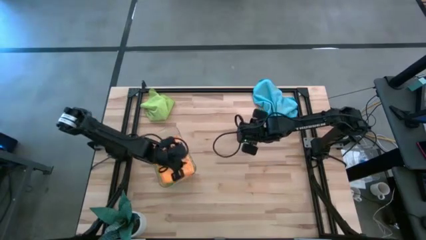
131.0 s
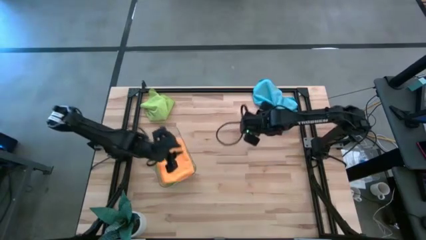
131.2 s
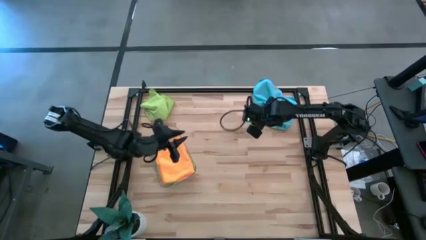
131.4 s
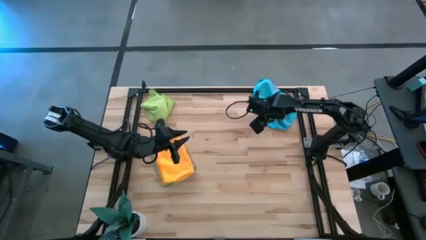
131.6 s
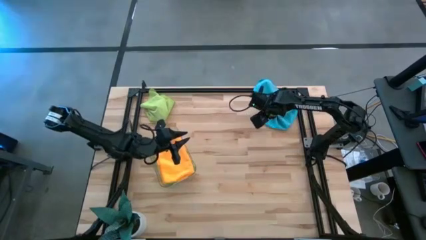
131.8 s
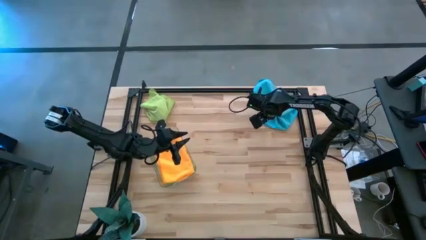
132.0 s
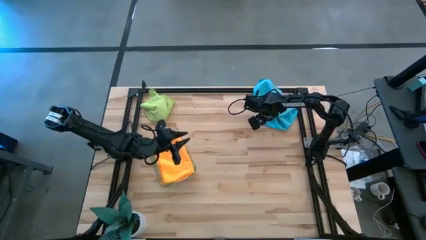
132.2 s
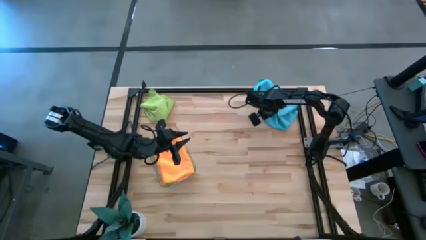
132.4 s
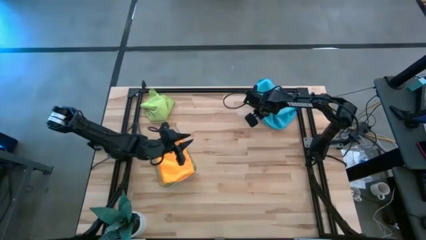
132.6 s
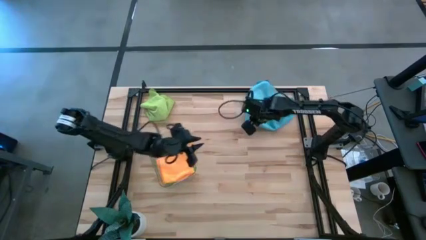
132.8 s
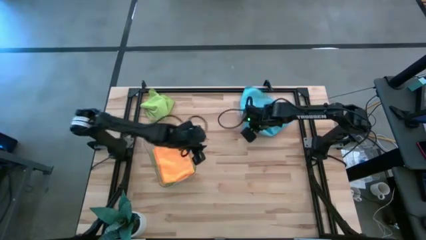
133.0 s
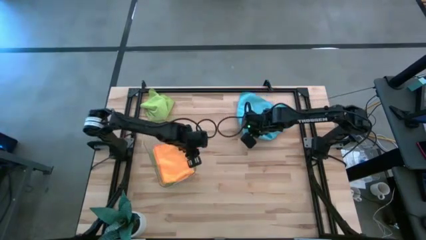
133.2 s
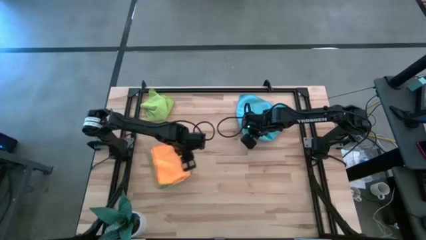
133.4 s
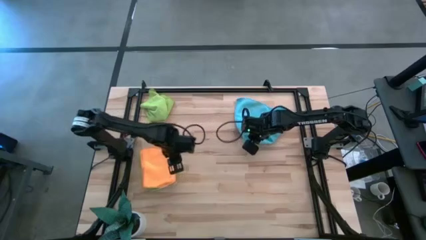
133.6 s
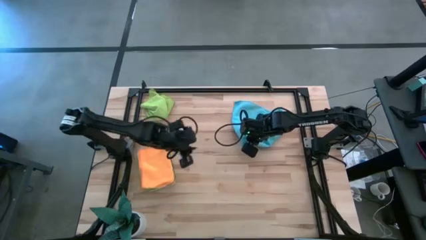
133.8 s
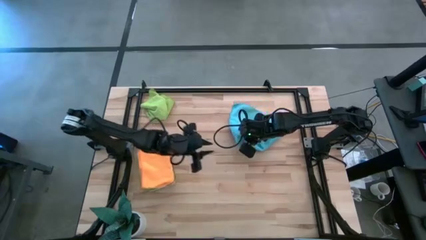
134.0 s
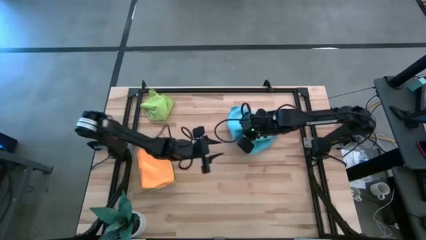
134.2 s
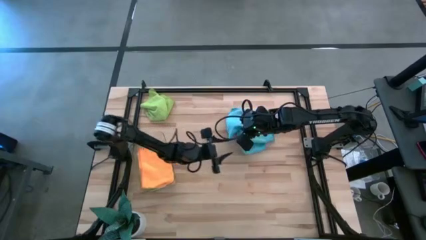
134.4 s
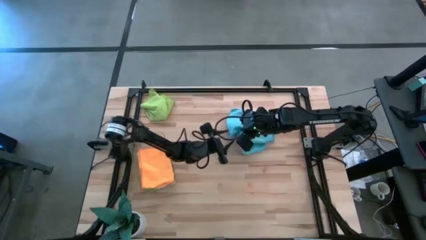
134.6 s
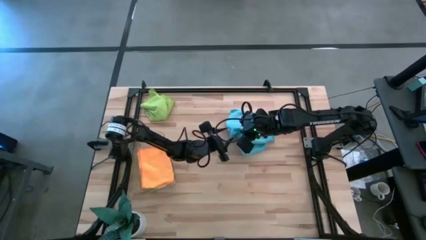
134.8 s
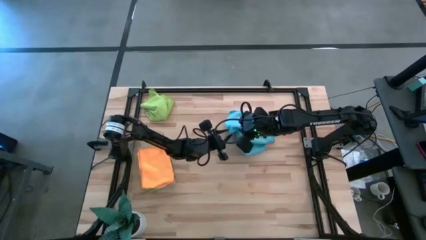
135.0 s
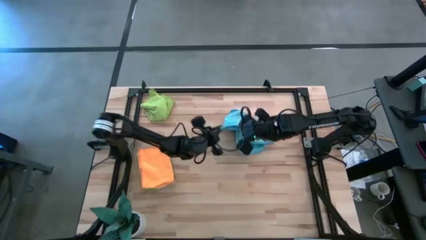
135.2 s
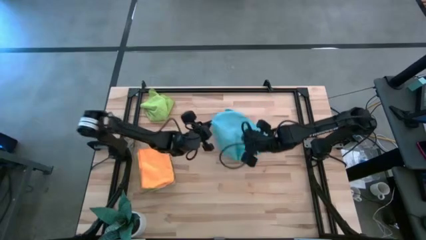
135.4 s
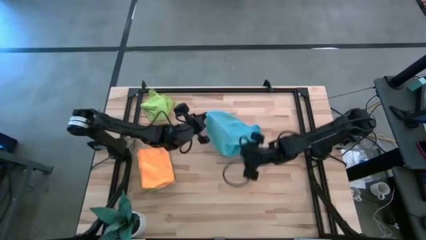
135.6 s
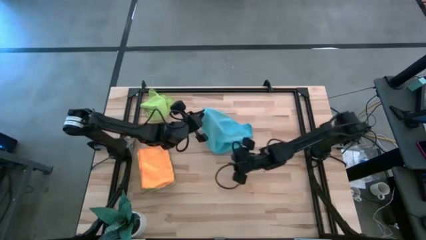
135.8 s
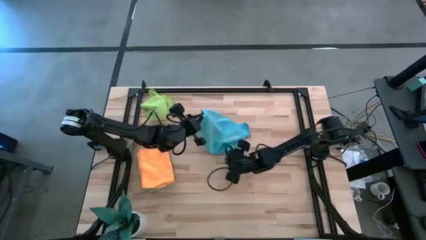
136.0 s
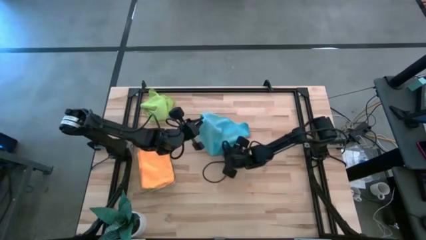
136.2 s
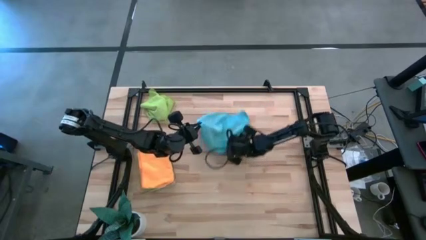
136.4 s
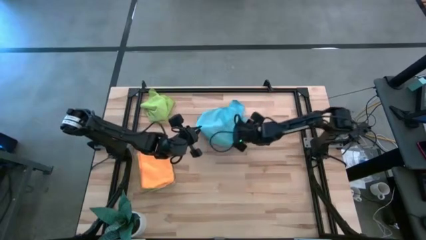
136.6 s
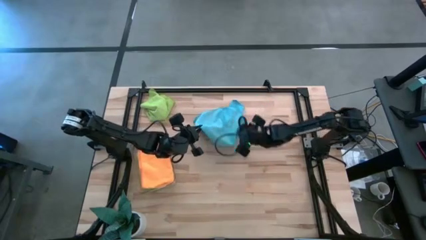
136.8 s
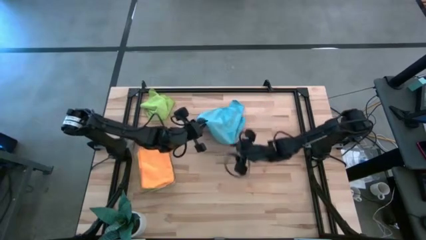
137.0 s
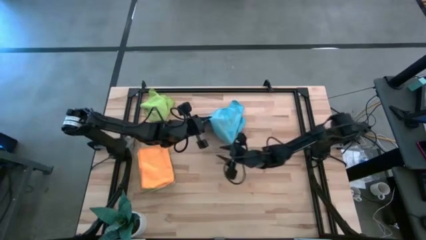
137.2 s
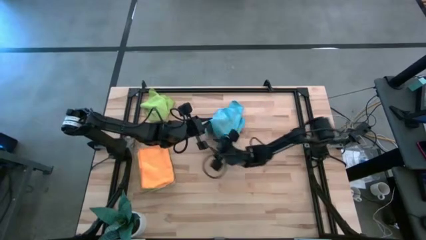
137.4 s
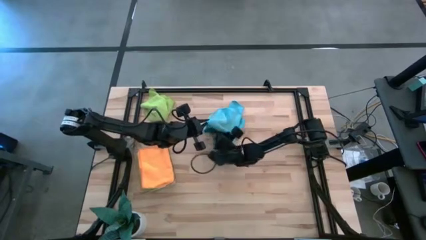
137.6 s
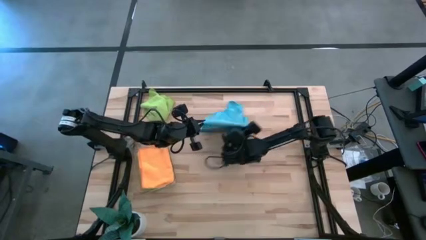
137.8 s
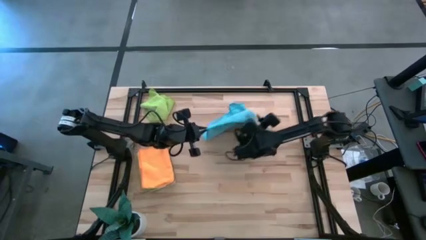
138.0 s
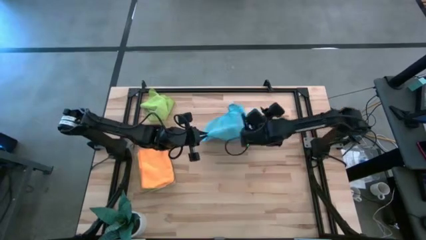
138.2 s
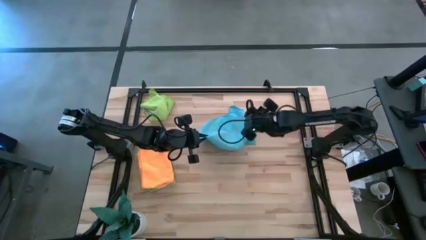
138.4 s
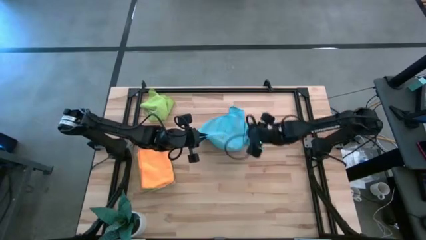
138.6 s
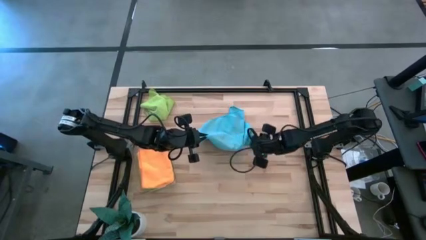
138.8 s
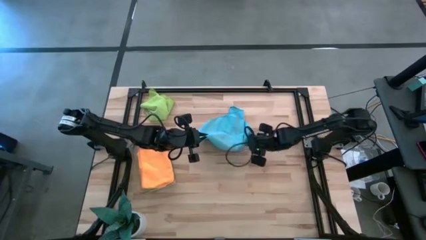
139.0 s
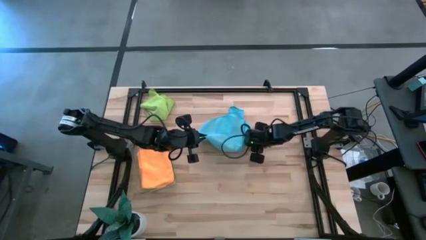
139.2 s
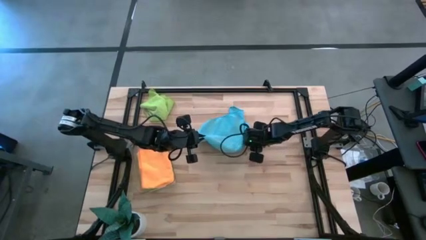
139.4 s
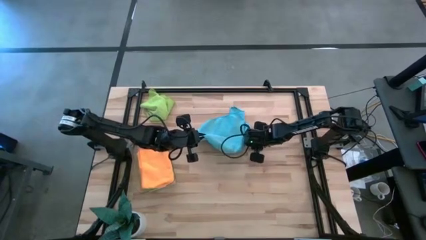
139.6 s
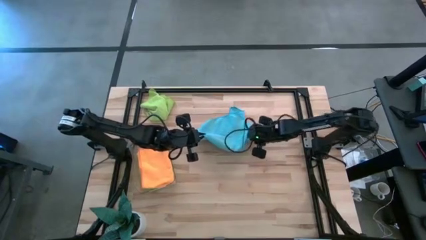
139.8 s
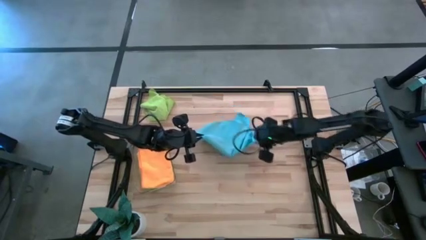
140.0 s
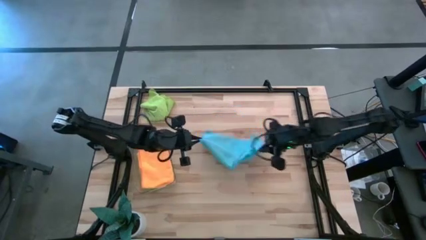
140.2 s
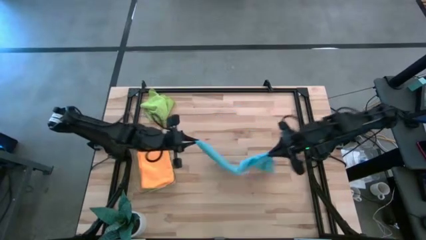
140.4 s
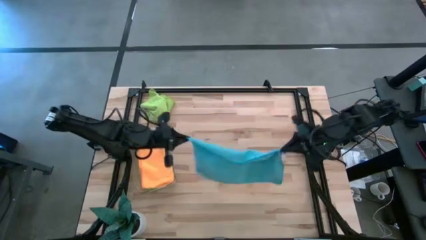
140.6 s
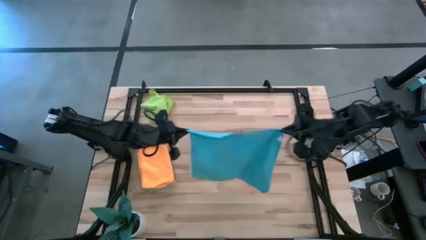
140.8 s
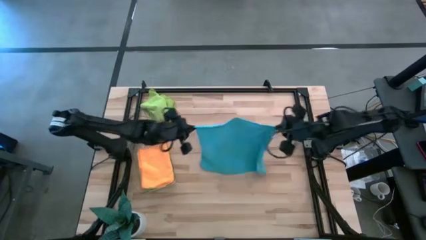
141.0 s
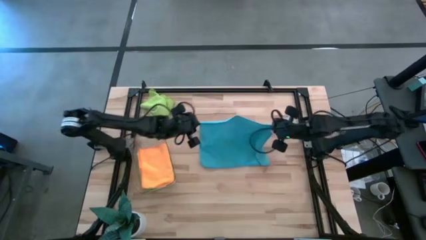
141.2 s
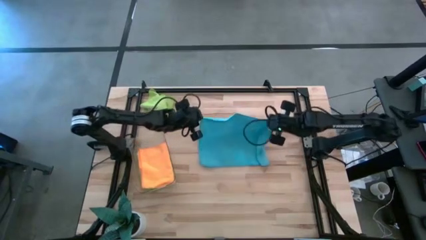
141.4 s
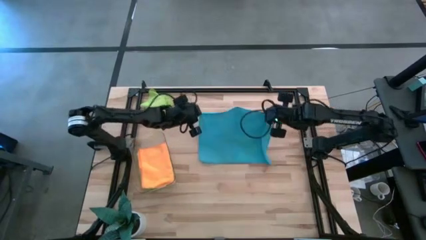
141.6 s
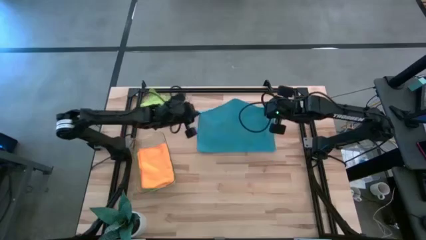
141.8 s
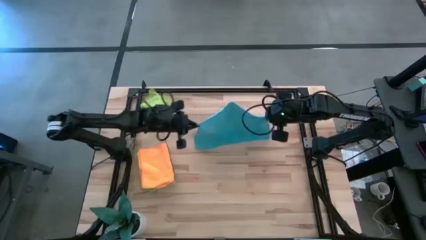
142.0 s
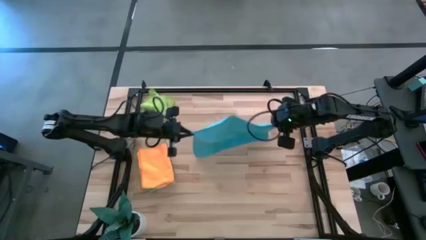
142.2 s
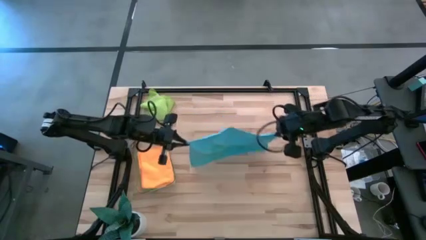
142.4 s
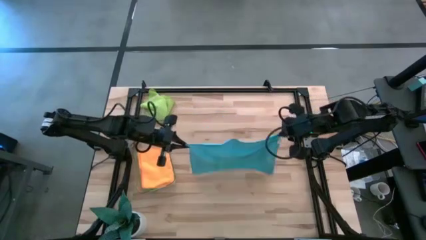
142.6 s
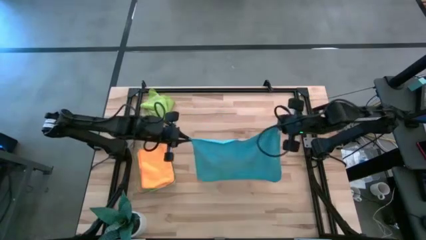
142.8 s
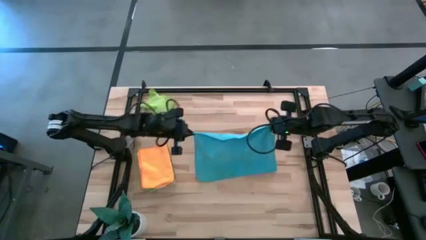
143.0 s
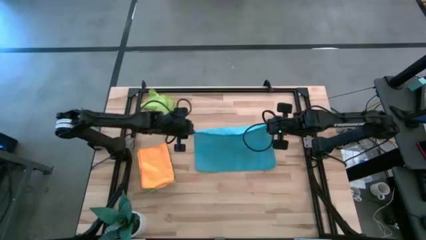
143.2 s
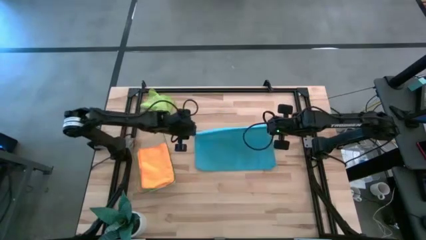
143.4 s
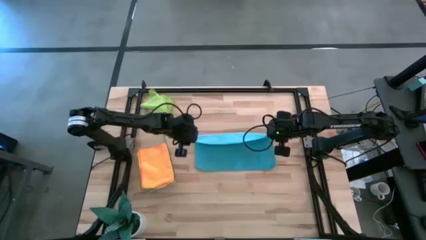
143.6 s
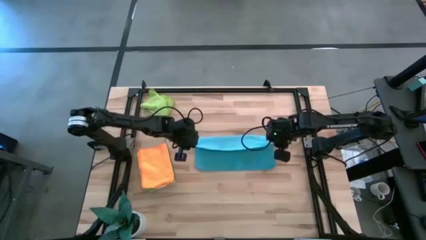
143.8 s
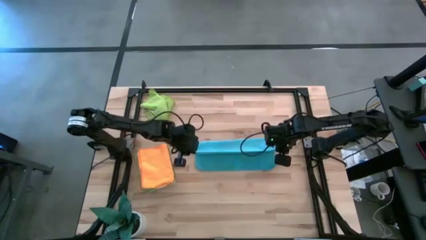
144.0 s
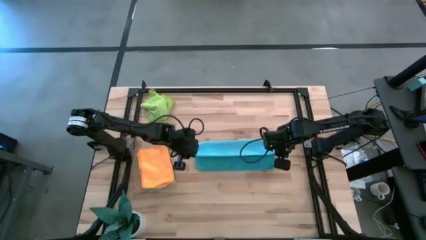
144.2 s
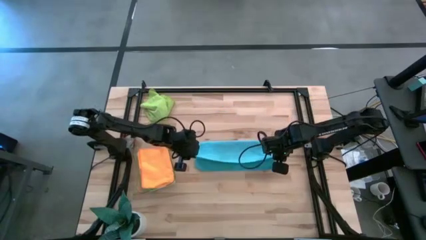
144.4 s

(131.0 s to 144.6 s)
Task: Fold microfiber towels
Fold the blue microfiber towel on the table
